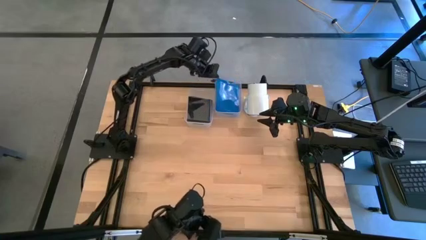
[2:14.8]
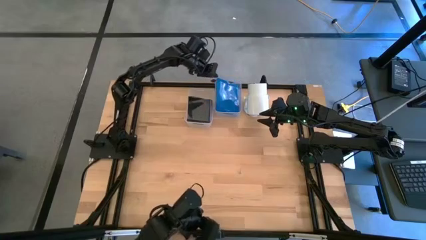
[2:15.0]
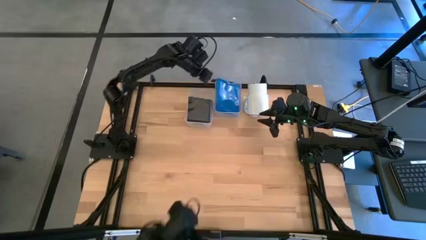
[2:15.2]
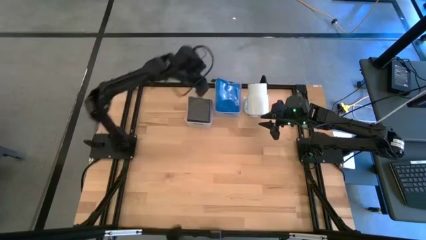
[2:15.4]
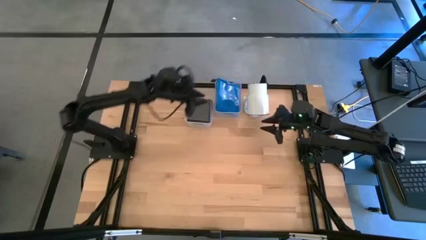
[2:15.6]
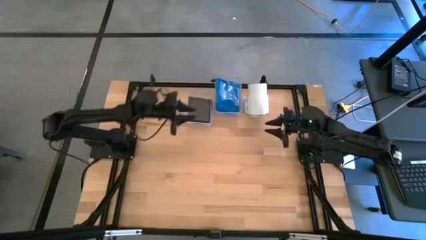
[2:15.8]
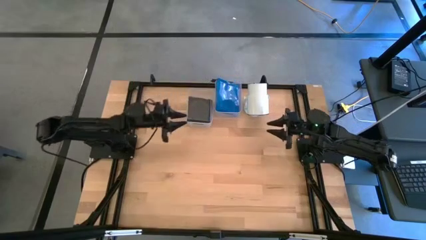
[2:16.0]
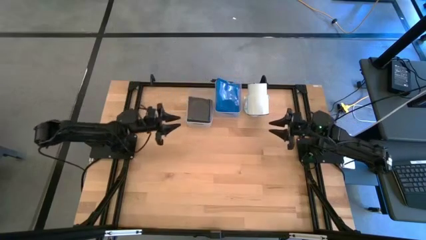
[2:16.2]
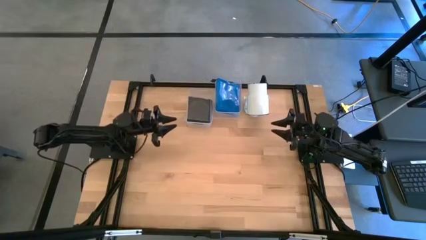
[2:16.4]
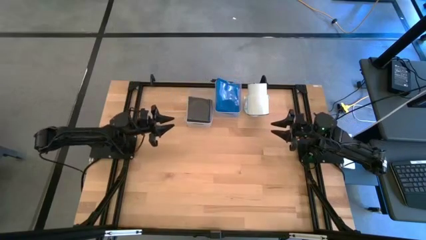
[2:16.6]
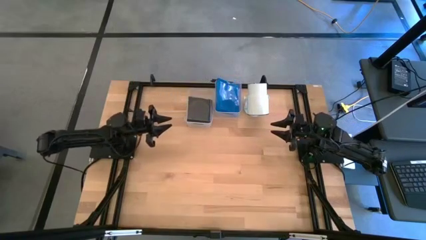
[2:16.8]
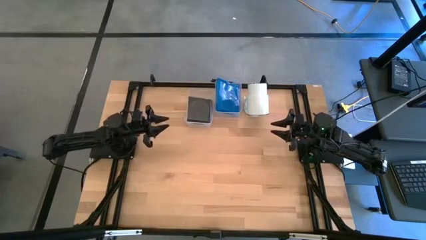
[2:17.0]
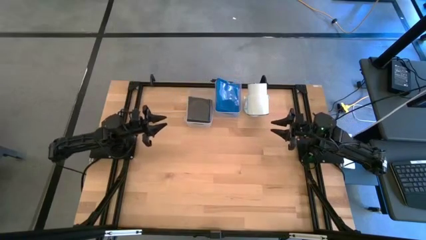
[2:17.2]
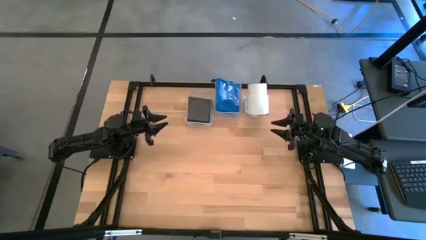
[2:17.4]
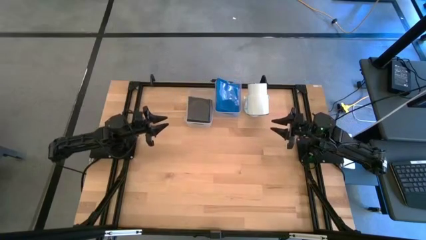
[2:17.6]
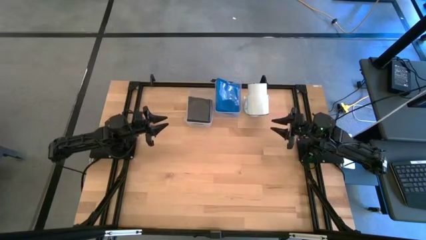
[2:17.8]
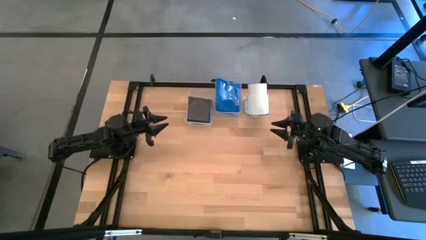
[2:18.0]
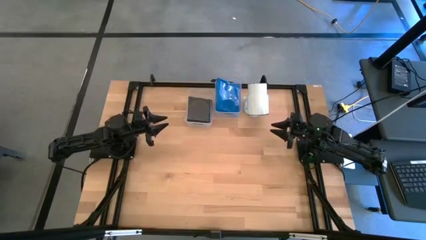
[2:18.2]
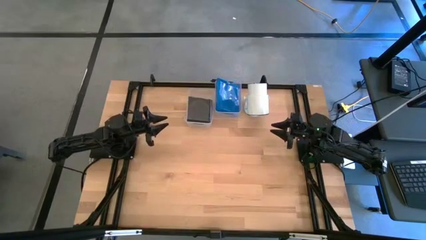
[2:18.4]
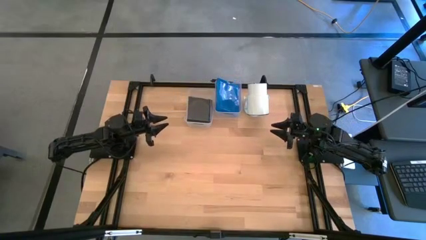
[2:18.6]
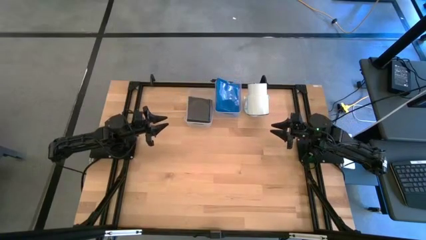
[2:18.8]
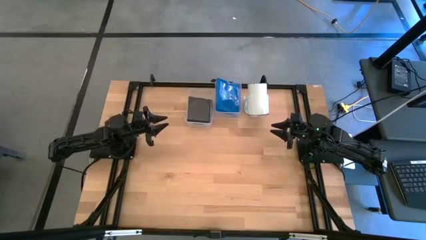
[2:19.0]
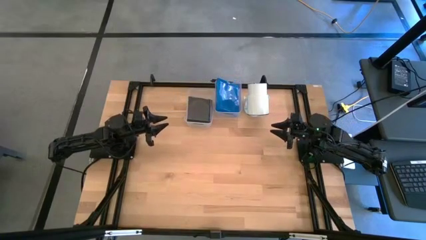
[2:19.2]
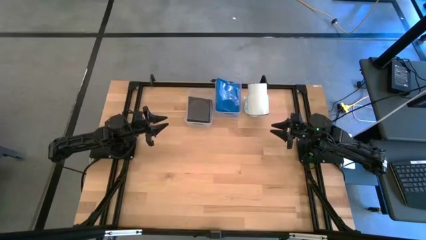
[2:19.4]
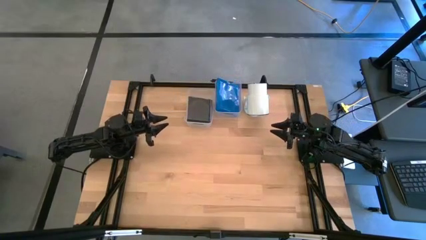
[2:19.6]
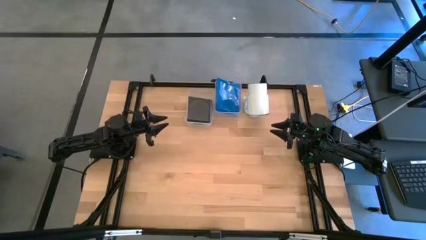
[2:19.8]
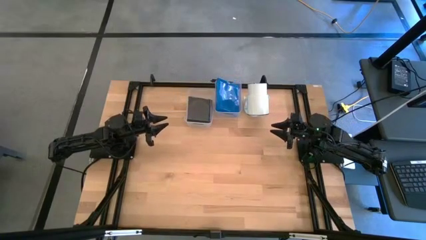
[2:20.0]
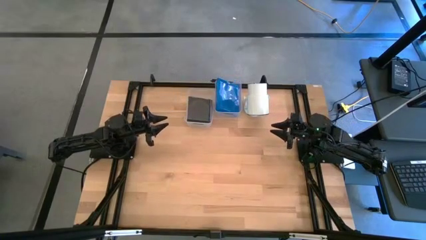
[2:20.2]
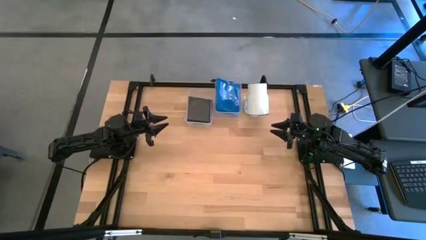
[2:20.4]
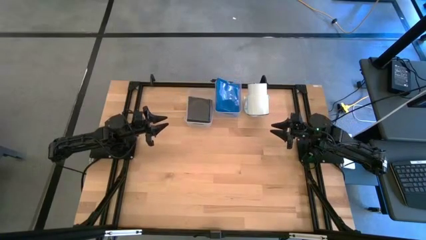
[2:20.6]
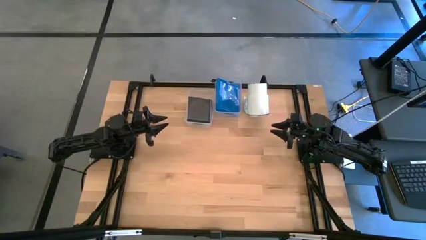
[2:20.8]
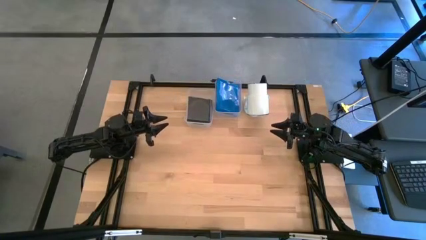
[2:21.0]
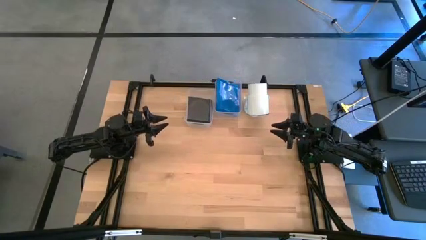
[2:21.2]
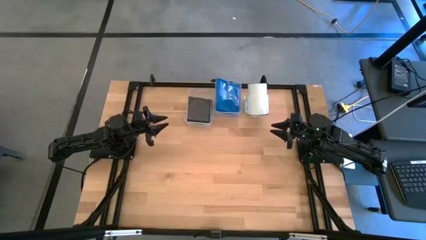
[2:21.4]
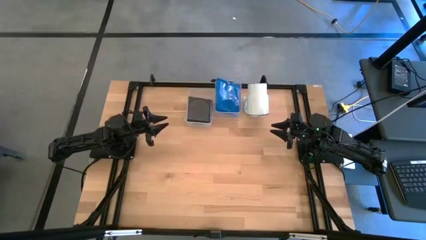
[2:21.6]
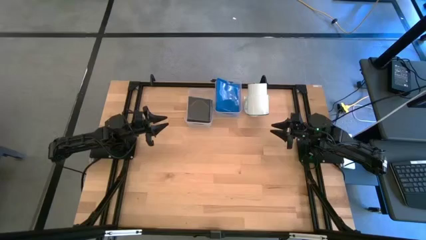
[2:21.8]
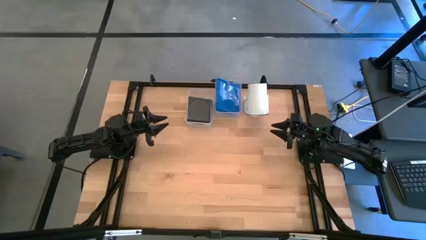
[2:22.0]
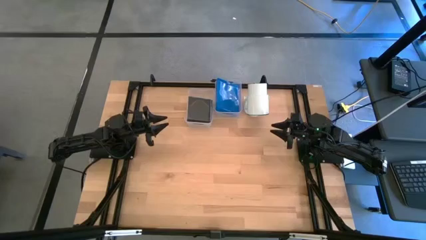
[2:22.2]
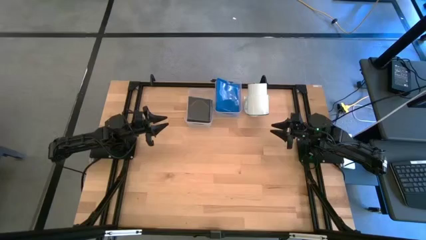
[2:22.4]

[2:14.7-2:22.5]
Task: Pick & place jewel cases by type
Return to Home Position

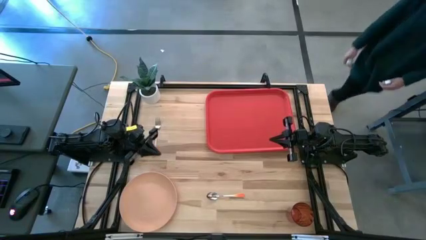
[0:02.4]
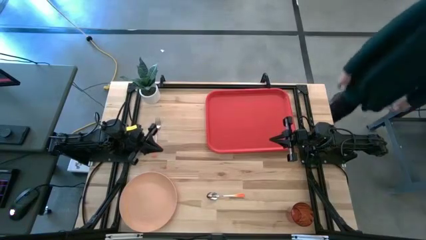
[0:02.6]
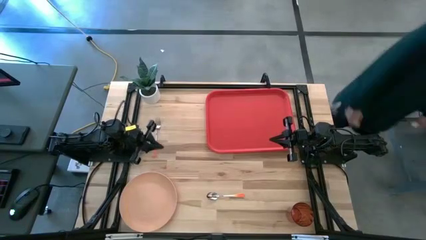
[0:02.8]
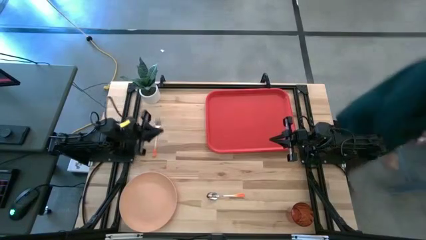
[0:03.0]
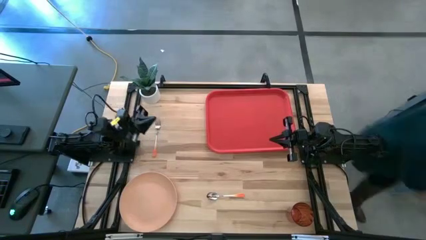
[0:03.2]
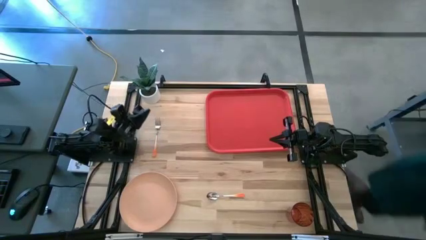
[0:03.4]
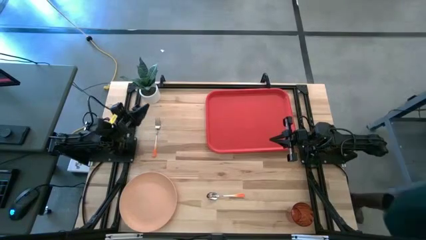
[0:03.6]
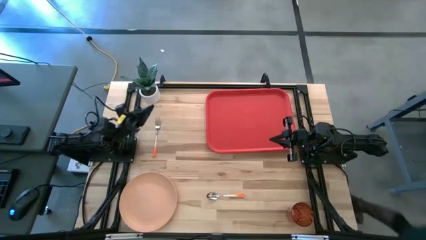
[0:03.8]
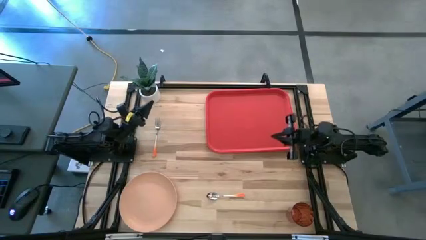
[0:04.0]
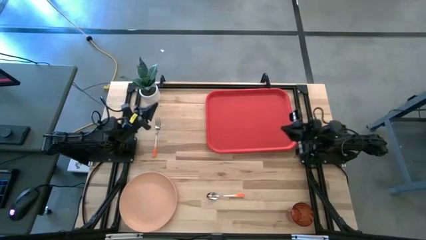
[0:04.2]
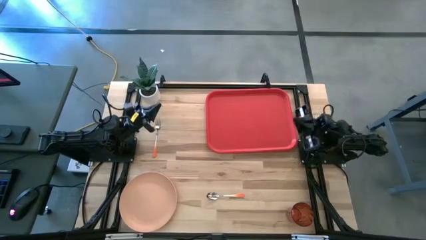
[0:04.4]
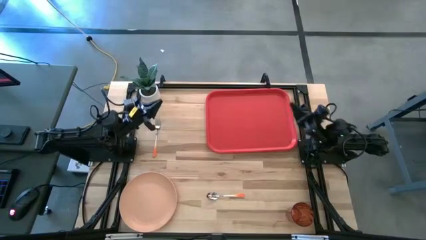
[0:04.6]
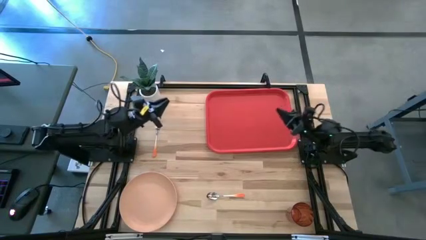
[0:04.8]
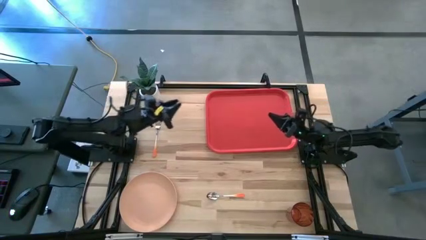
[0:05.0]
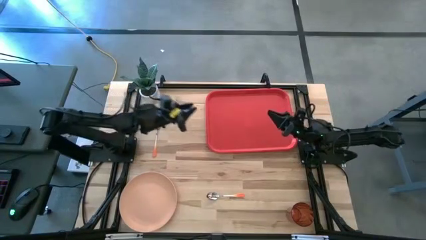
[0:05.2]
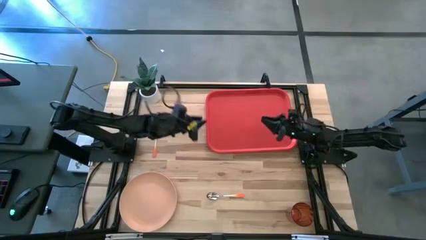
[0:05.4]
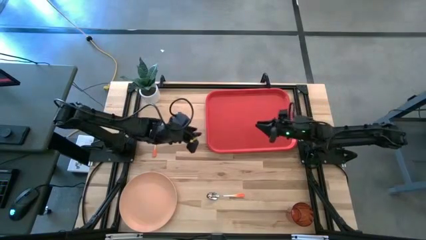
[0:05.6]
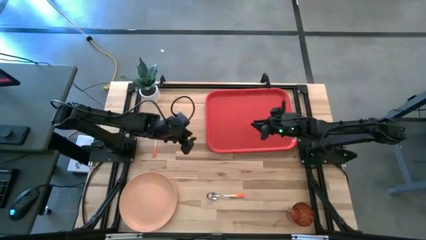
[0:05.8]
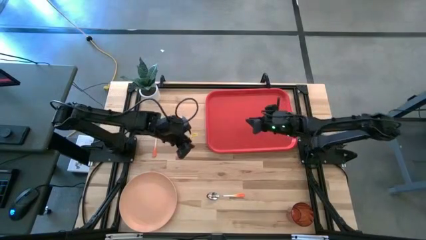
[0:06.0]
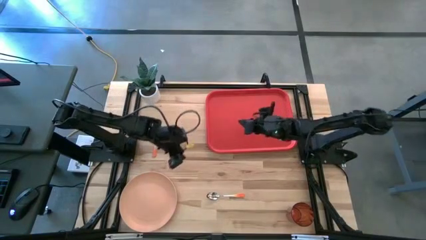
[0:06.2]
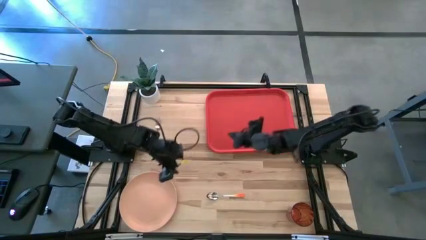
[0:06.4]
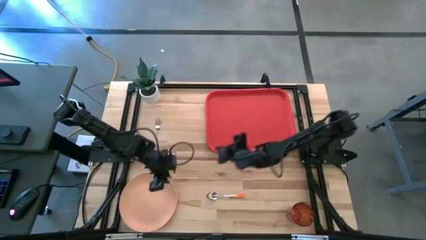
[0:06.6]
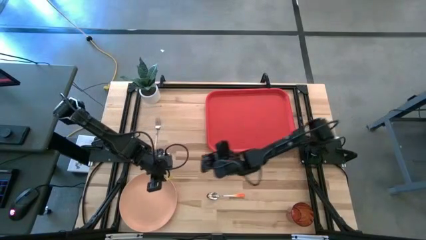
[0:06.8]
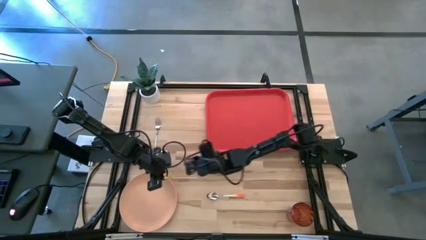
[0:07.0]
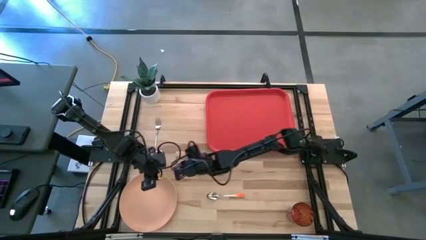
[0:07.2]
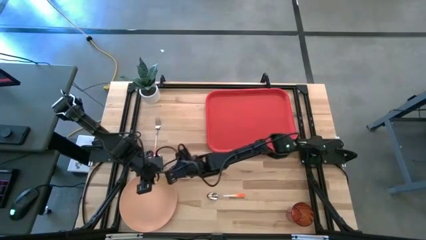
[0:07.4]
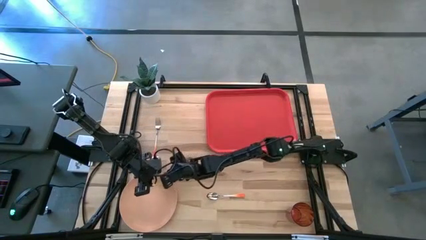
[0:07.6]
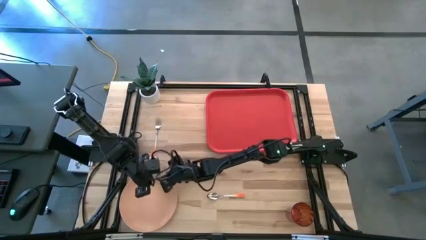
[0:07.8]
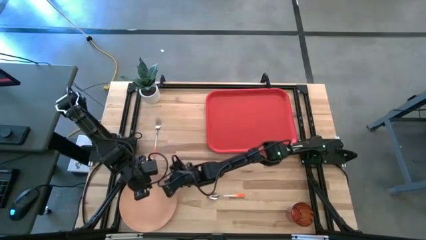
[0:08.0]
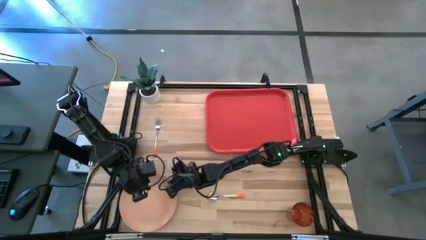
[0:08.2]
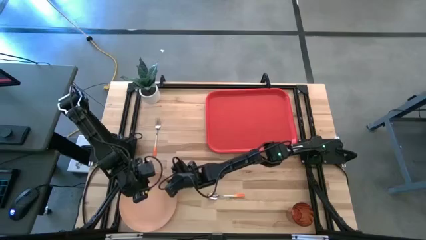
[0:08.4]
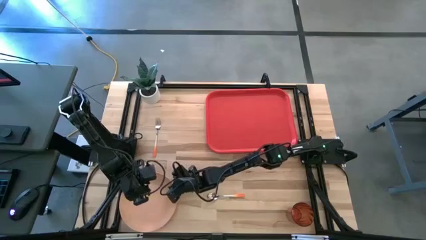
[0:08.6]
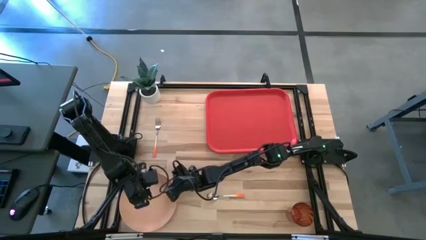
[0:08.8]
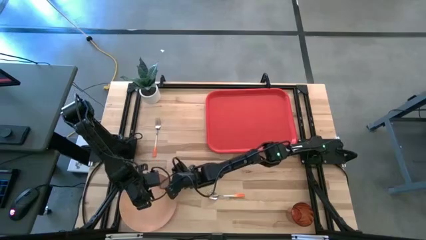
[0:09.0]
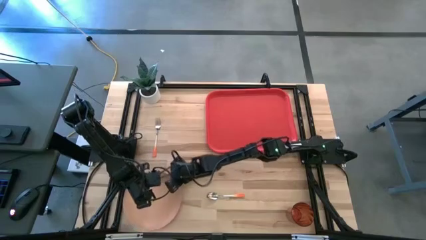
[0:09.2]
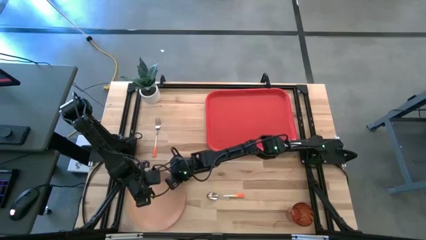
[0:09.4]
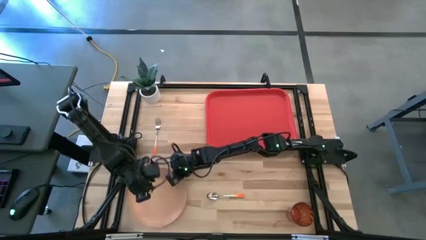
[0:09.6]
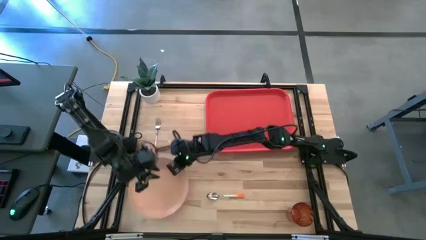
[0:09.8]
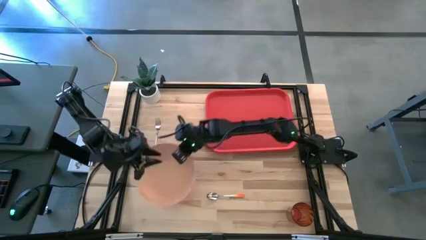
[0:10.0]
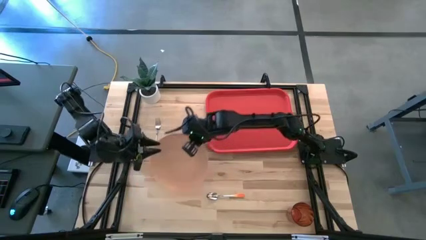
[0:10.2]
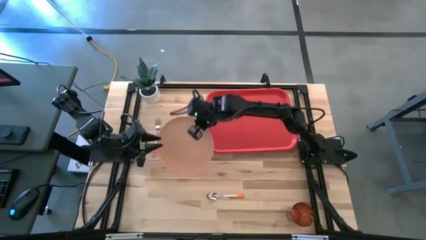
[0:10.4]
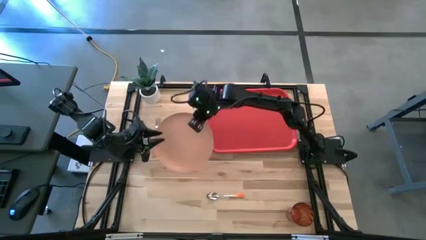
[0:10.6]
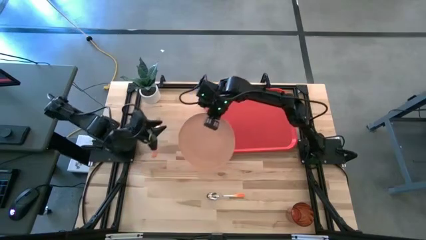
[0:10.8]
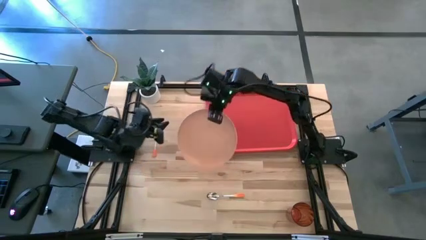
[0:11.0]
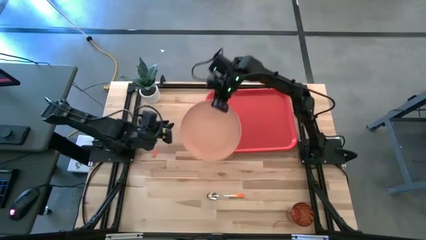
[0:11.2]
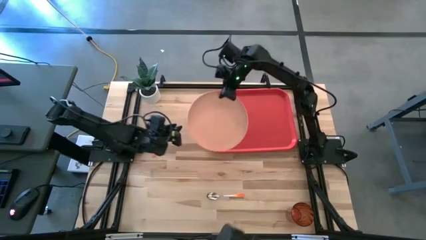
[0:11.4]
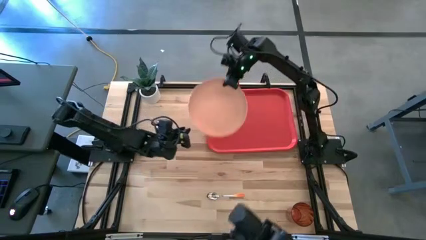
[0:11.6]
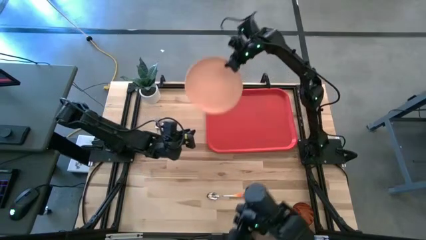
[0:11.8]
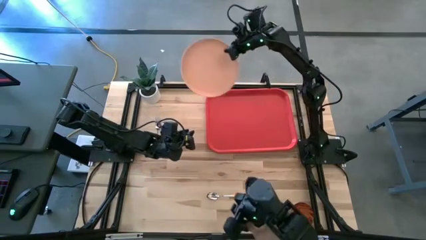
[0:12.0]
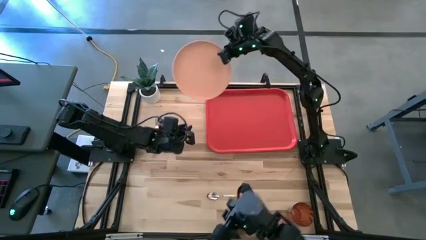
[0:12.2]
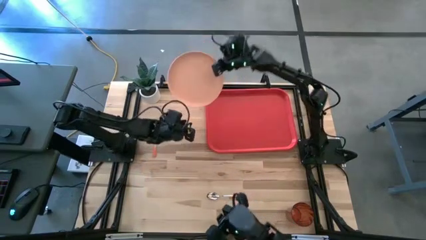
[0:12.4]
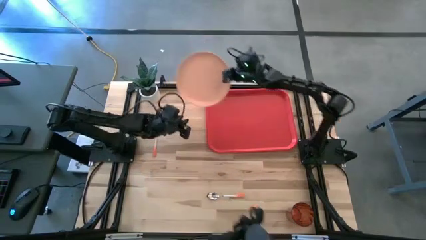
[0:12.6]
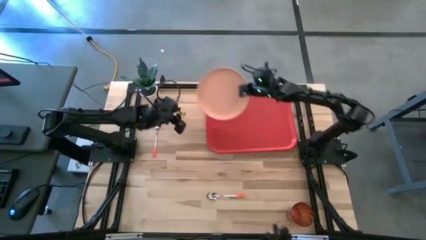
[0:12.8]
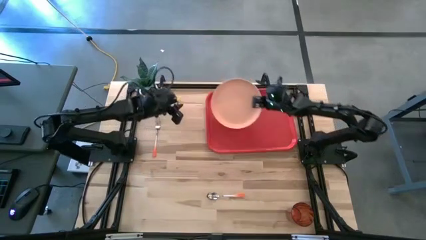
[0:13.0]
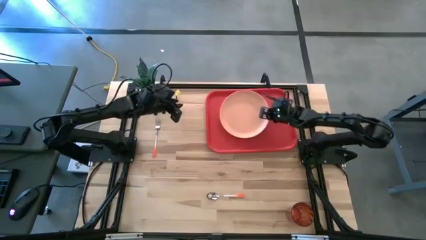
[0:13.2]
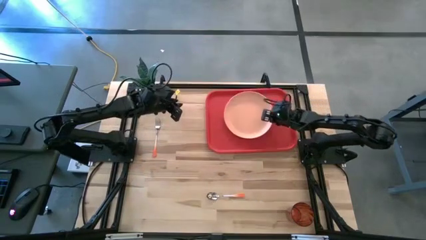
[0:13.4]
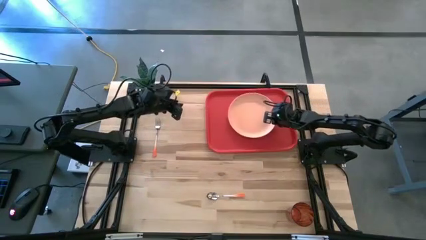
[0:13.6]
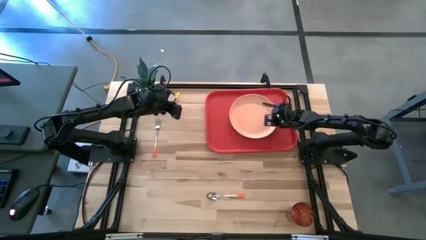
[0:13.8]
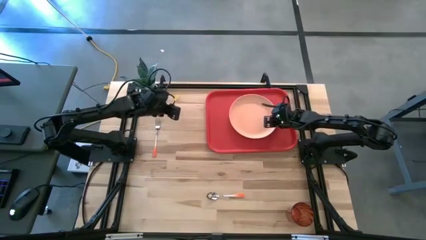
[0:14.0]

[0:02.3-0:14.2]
Task: Pick and place plate/cup/fork/spoon on tray
Put the light pink plate on the red tray
